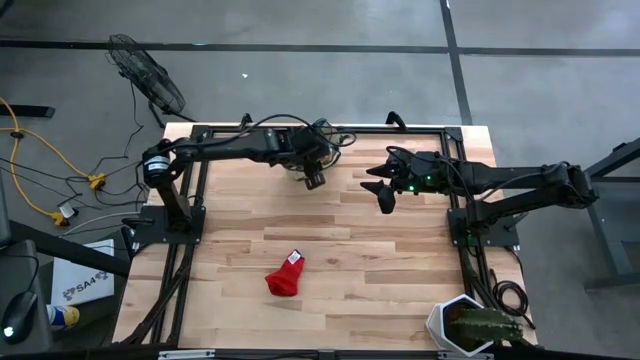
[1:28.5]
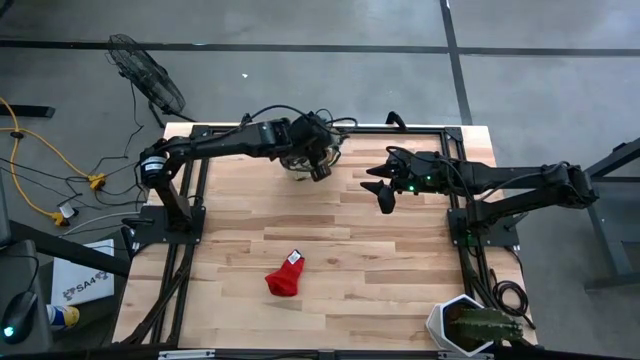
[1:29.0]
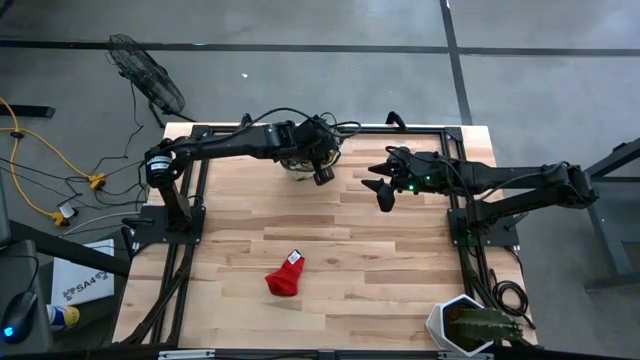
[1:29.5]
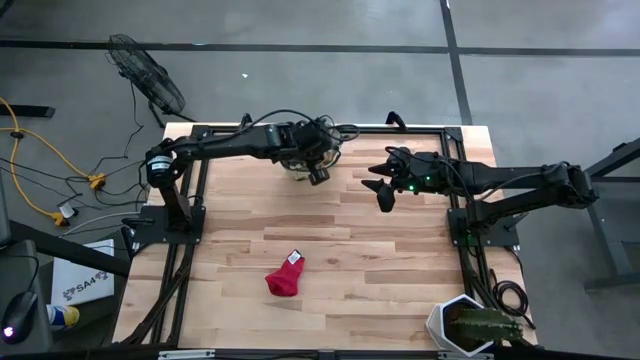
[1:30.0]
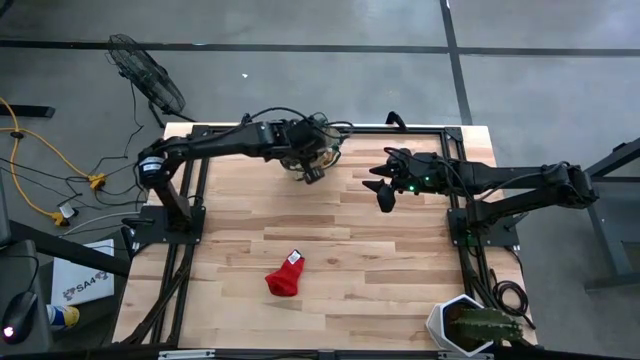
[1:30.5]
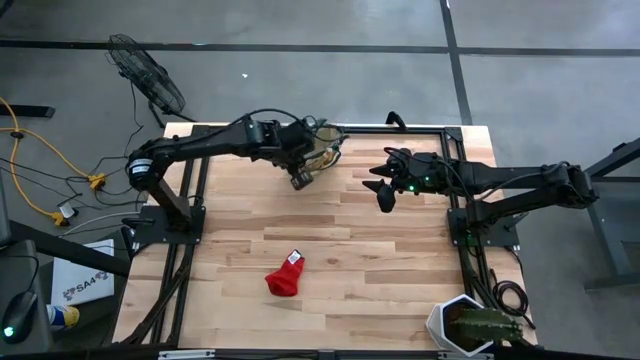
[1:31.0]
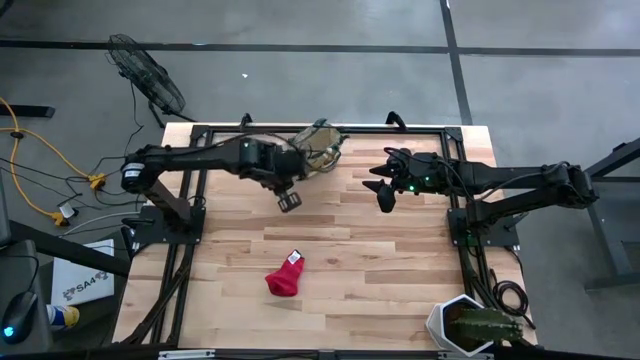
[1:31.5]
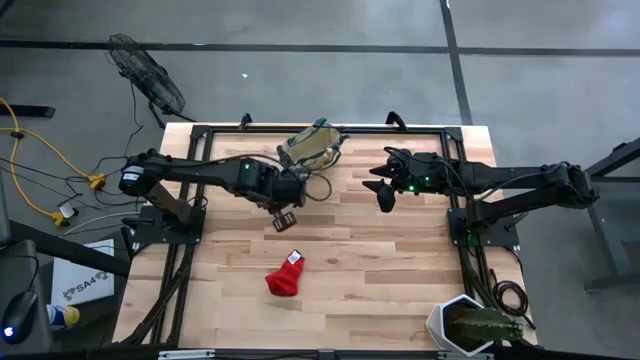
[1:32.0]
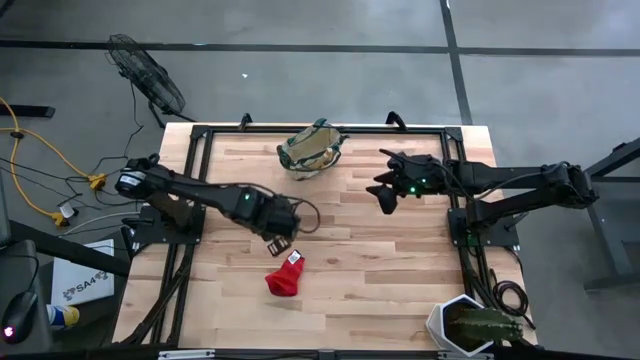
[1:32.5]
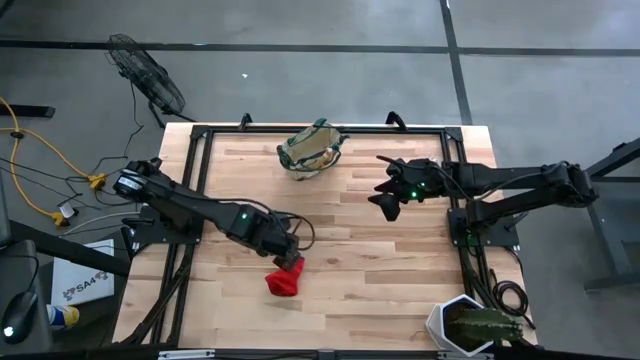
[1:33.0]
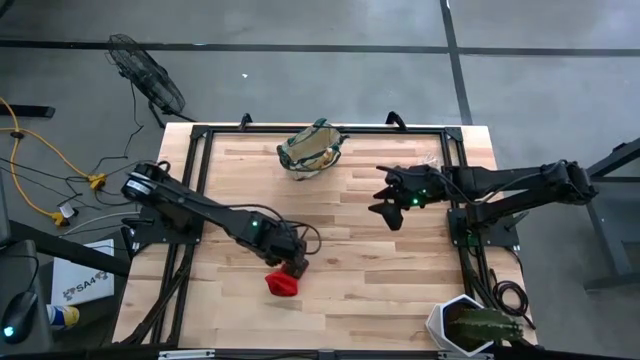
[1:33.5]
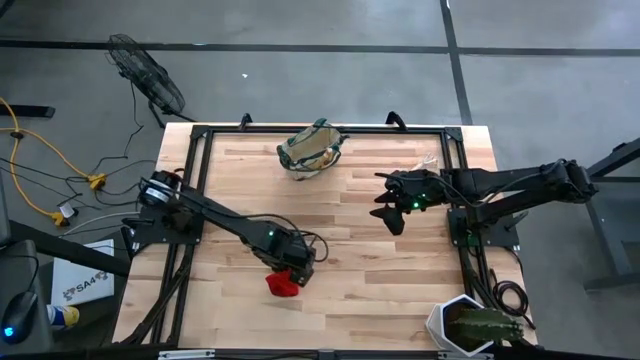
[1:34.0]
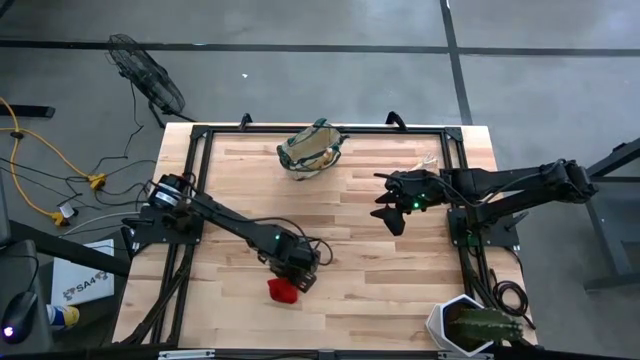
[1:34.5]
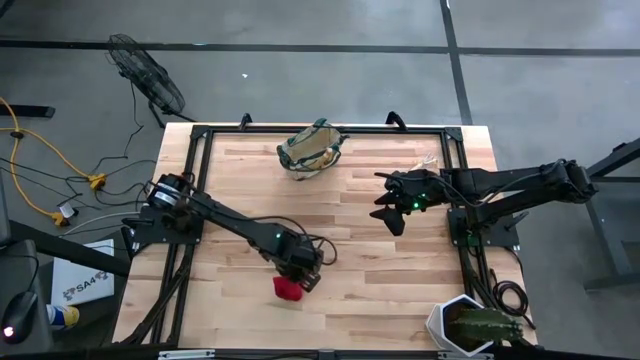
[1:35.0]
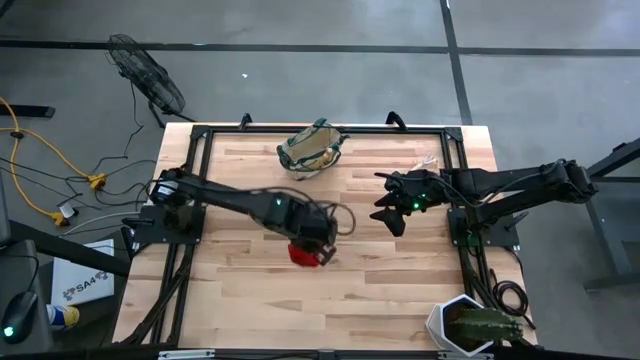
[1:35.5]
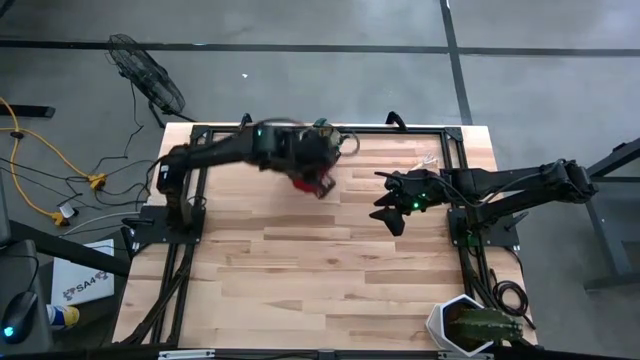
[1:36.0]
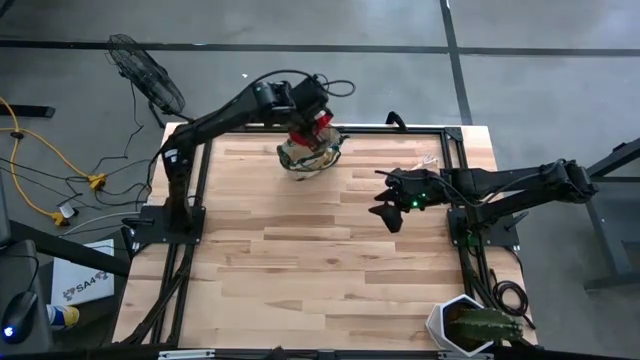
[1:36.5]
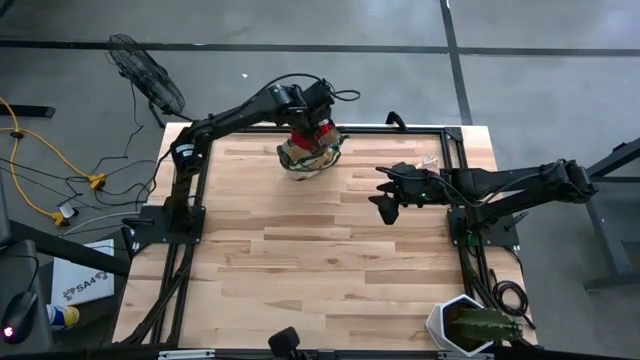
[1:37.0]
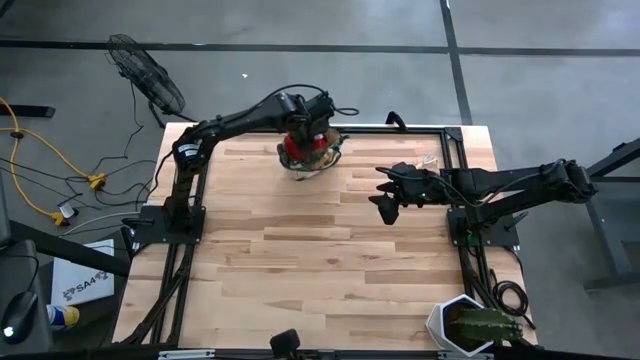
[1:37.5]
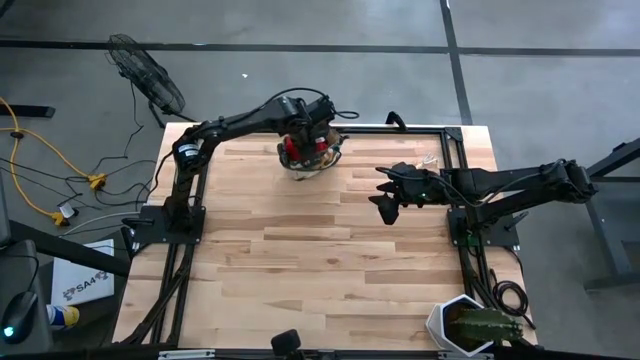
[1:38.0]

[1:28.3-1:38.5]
Task: Pick & Place Garden tools in Gardening bag
Put the red gloves into the white gardening bag

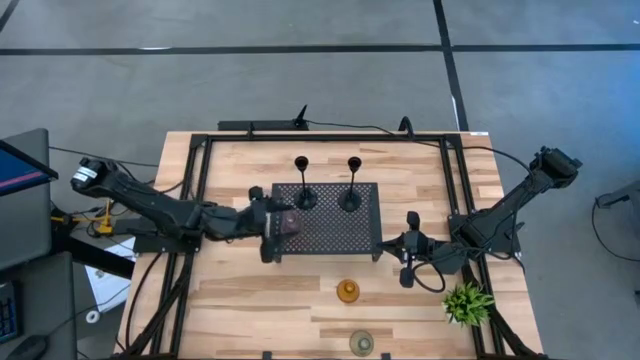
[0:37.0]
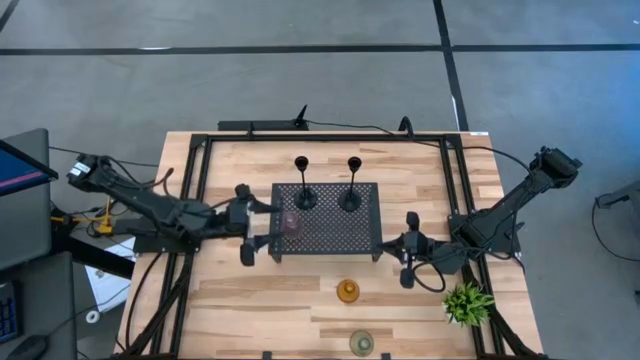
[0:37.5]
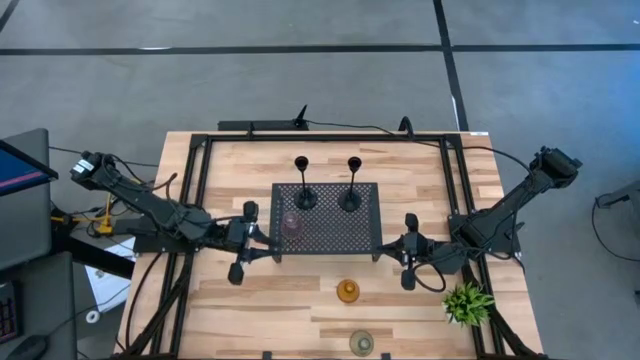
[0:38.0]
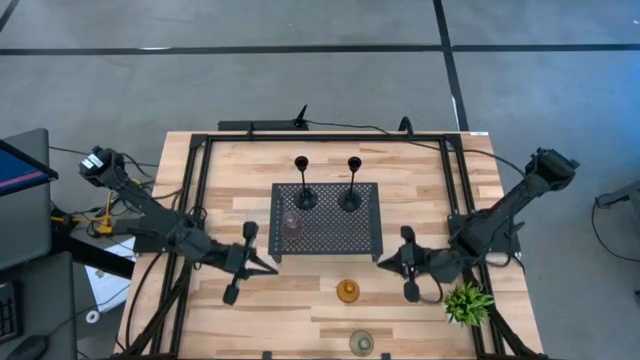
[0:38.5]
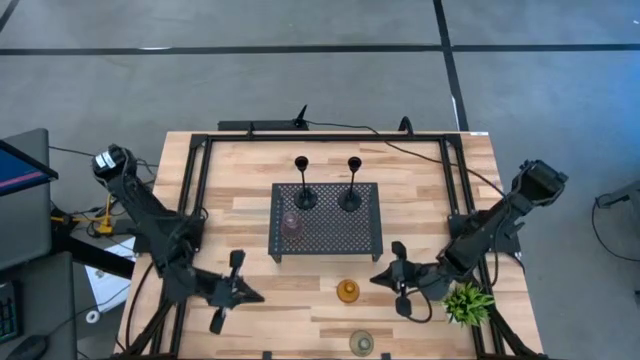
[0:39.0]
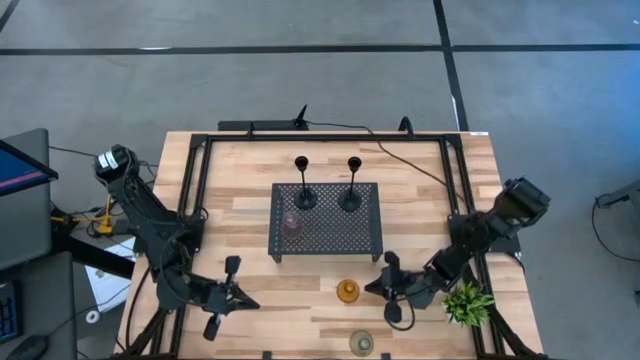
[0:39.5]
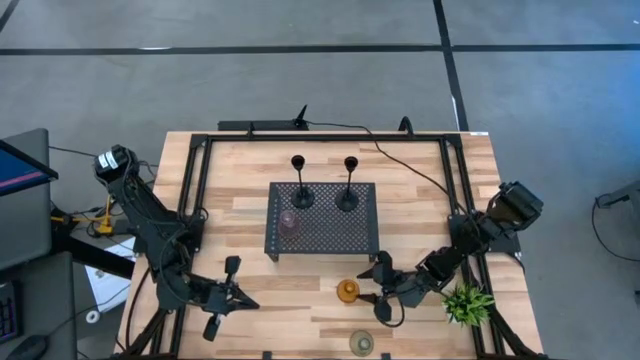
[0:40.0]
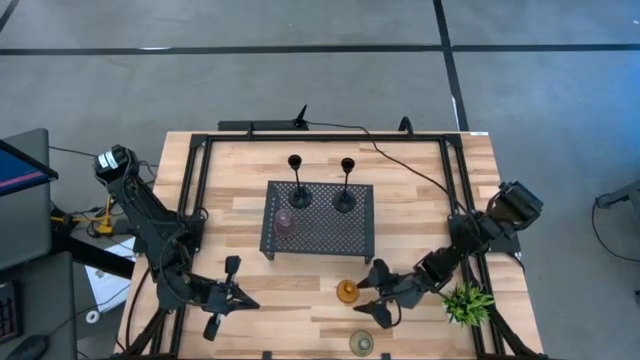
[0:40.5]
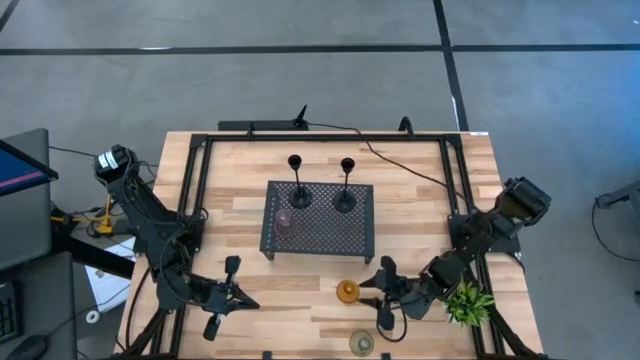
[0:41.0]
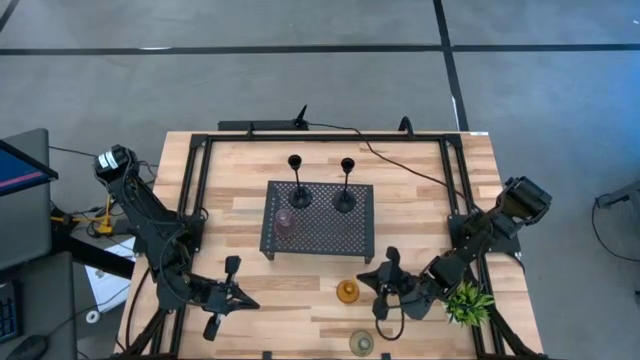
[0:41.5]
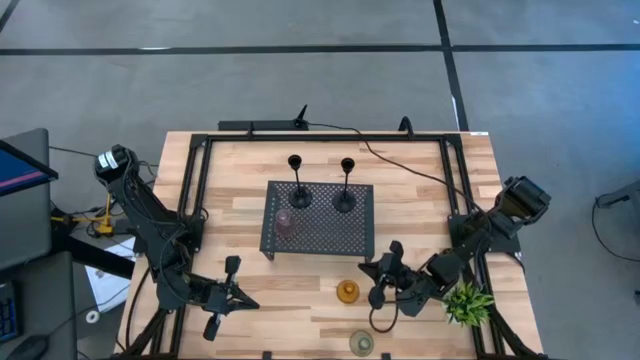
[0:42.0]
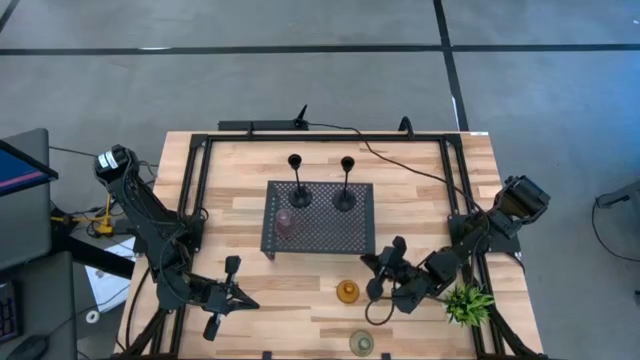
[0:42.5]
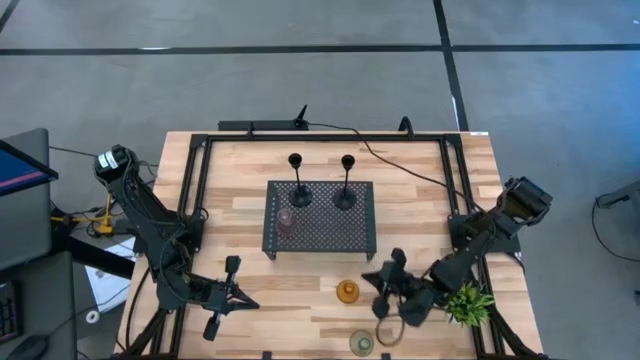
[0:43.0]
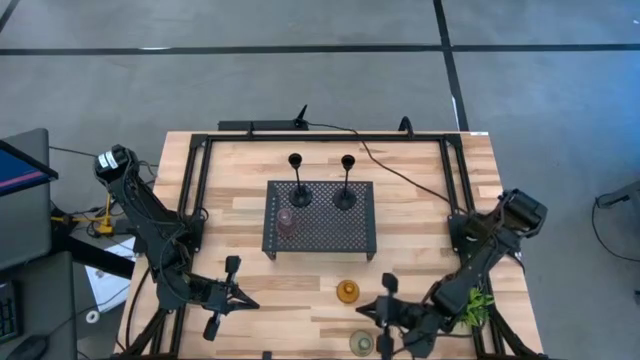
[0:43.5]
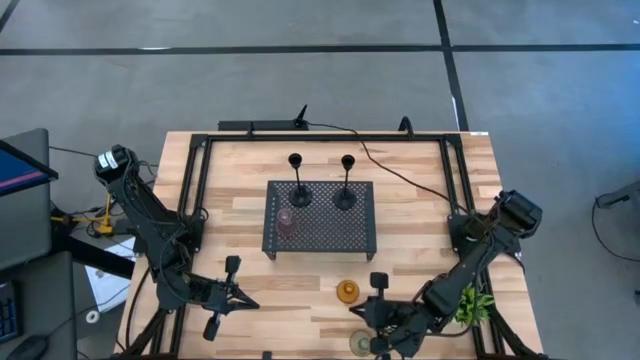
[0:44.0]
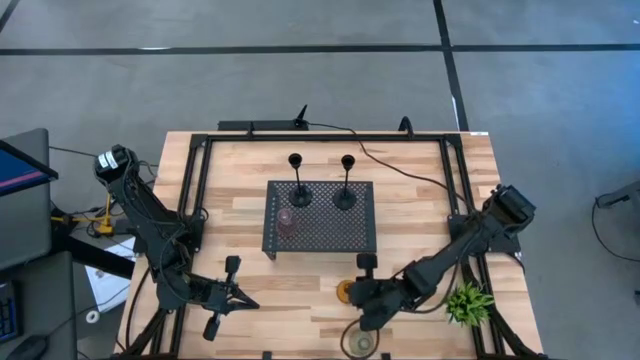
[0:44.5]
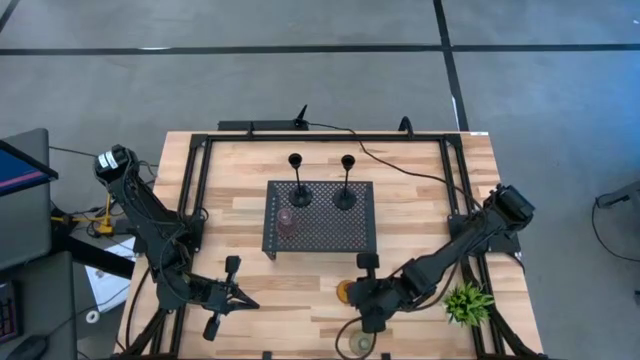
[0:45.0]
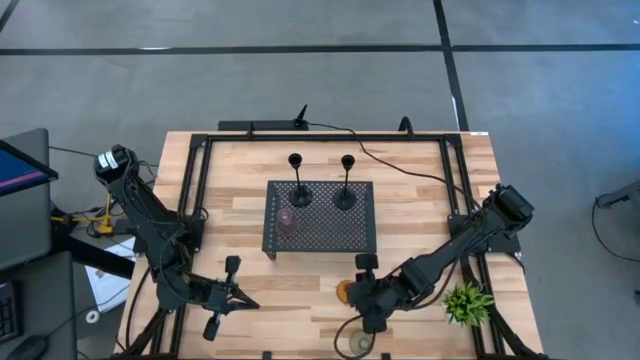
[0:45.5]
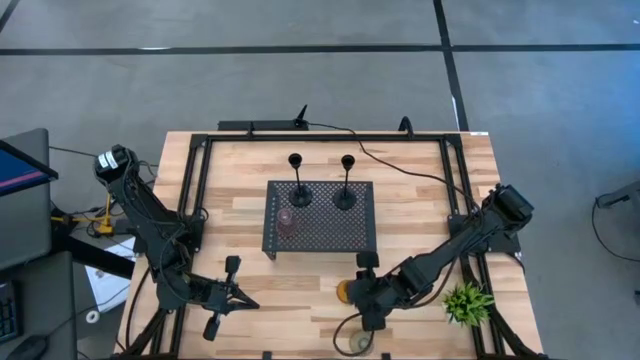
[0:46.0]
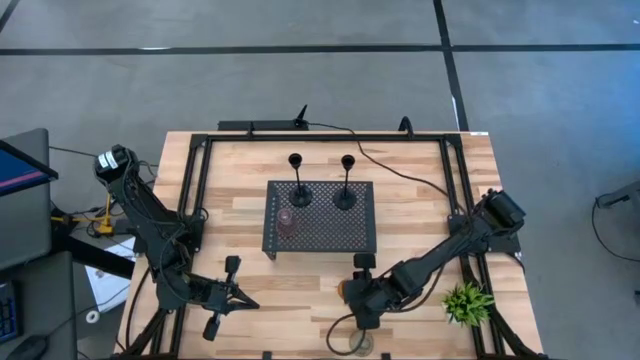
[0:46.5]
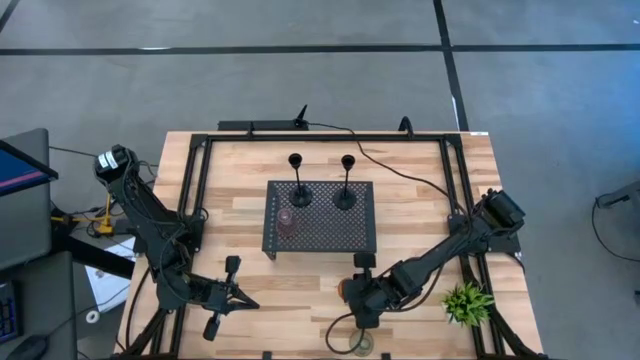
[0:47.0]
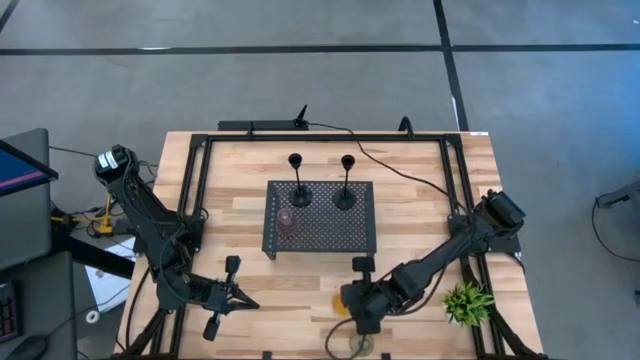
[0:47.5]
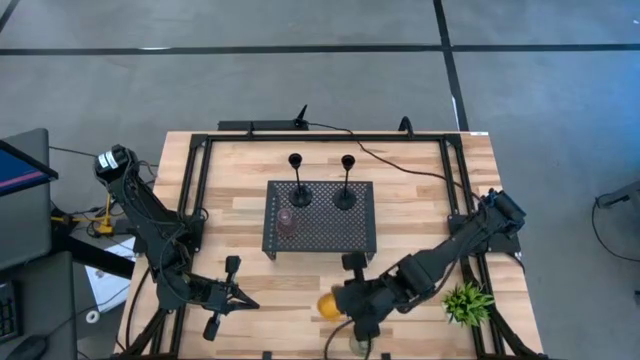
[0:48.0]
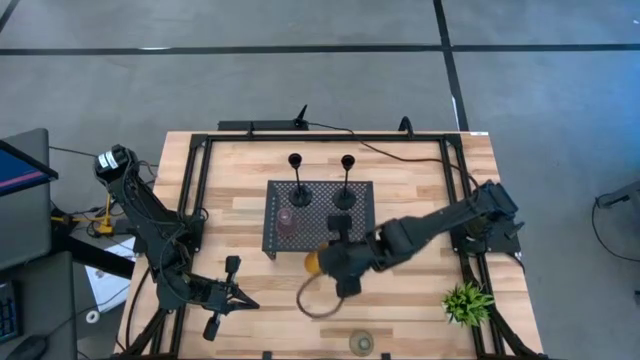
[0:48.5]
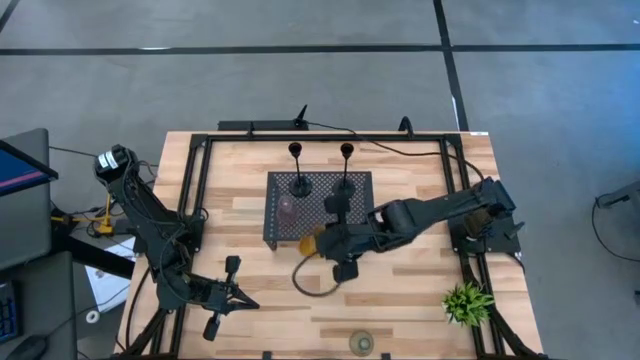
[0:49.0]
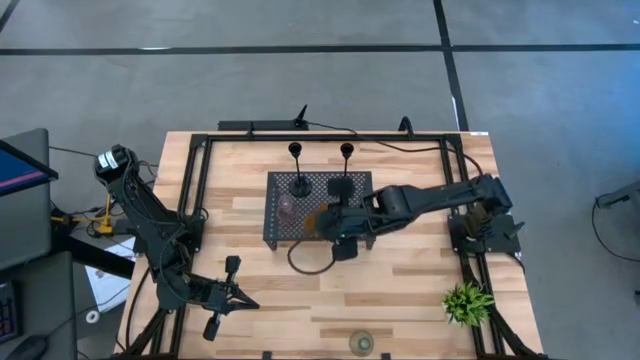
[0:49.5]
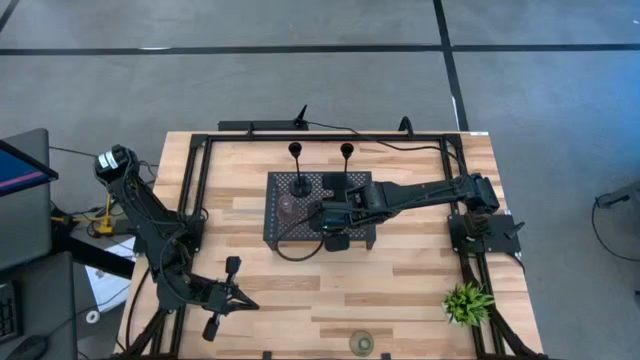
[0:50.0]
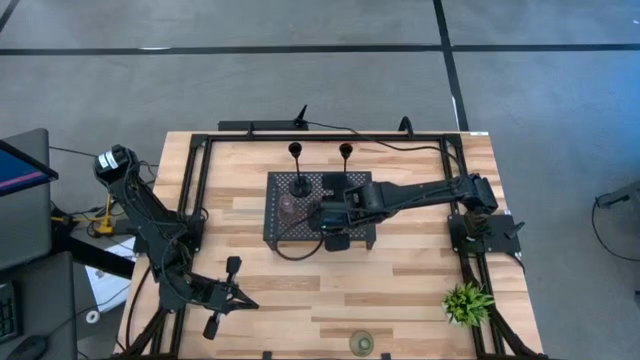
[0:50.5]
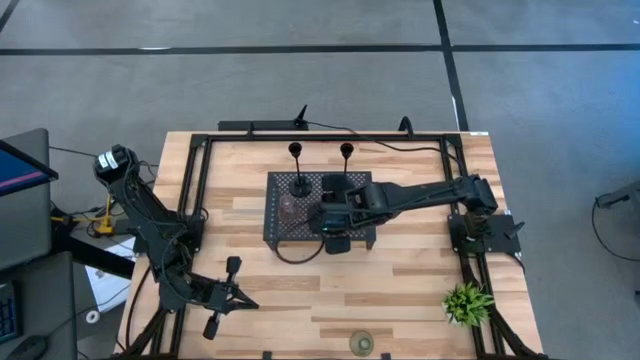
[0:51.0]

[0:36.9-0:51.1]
Task: Pick & Place candle stick holders
Align the orange glass candle holder with the pink glass candle holder on the shelf
